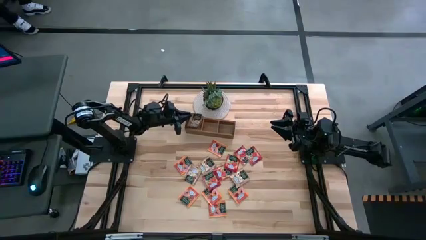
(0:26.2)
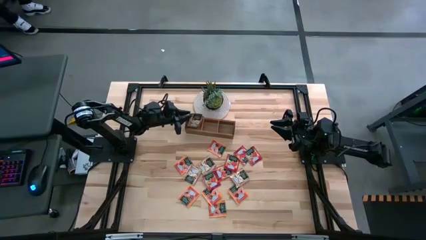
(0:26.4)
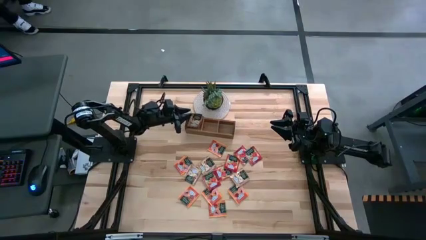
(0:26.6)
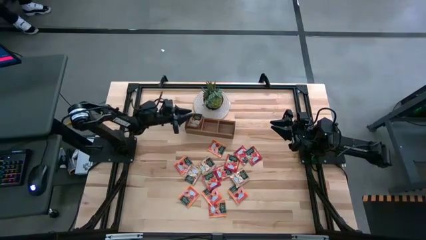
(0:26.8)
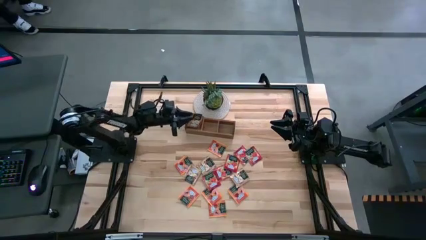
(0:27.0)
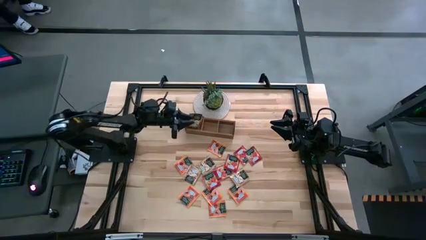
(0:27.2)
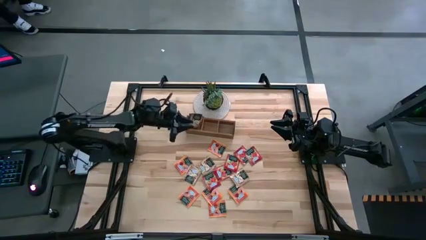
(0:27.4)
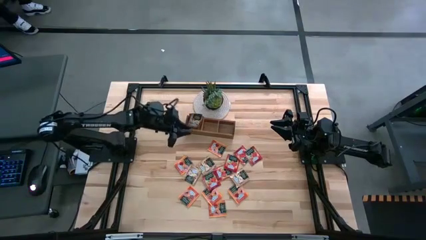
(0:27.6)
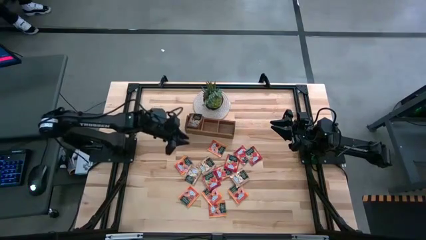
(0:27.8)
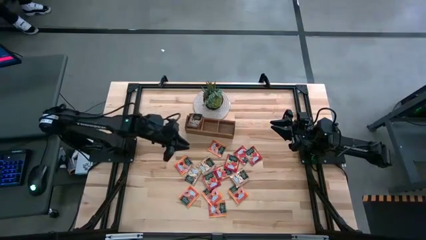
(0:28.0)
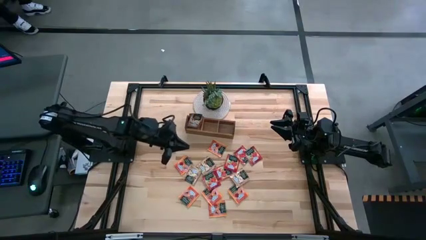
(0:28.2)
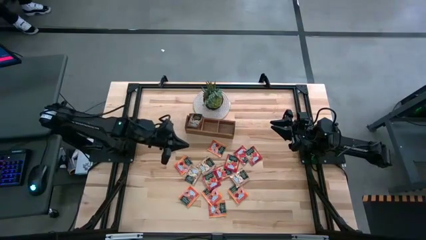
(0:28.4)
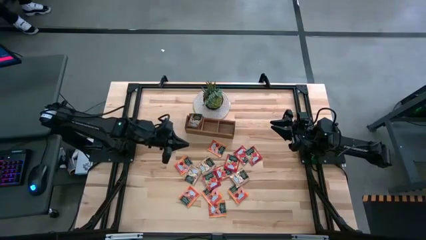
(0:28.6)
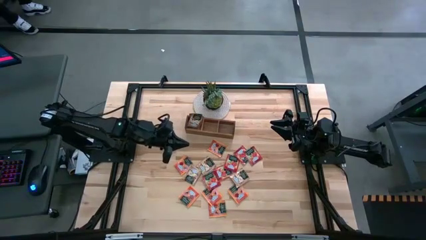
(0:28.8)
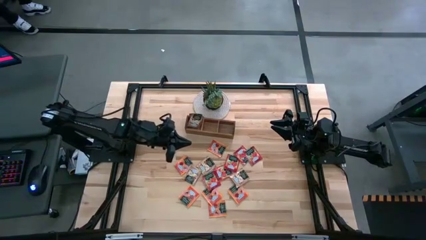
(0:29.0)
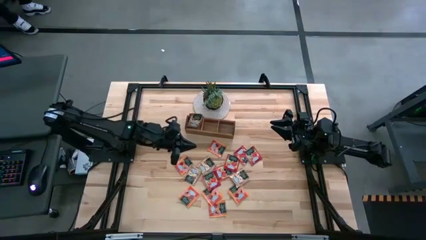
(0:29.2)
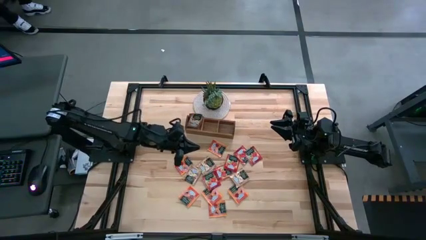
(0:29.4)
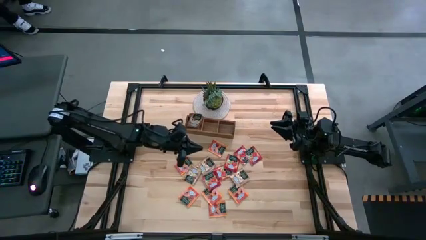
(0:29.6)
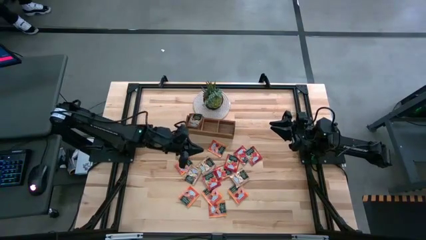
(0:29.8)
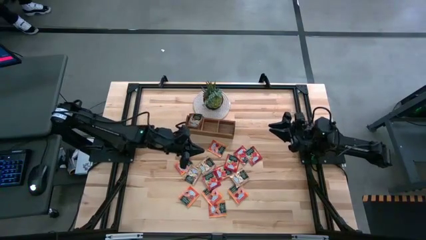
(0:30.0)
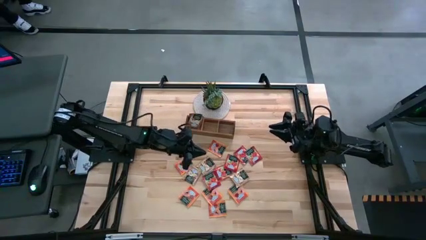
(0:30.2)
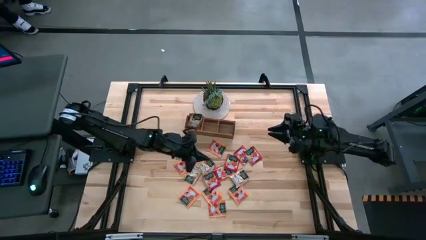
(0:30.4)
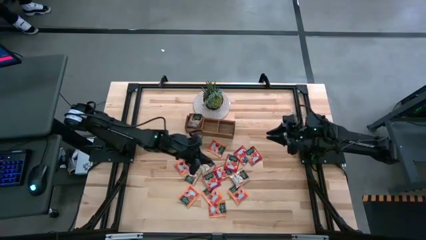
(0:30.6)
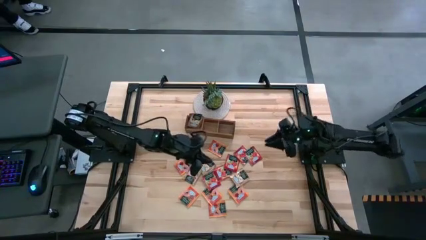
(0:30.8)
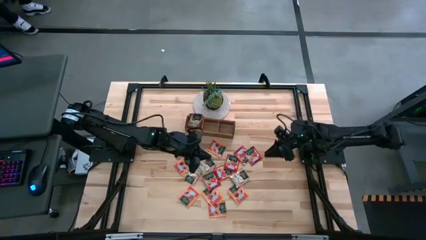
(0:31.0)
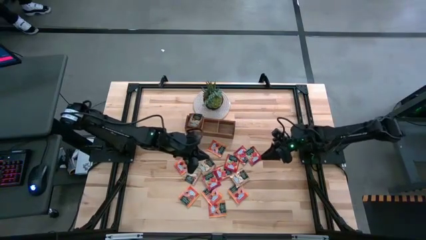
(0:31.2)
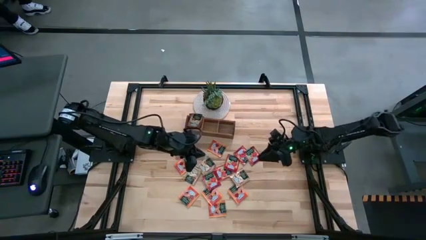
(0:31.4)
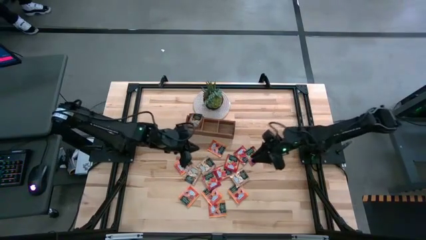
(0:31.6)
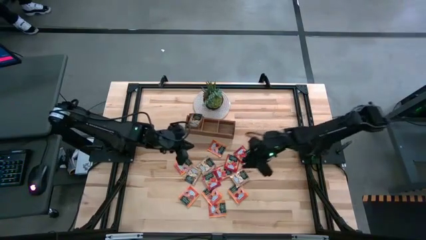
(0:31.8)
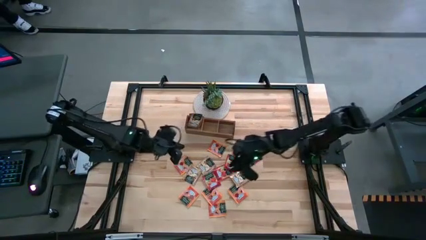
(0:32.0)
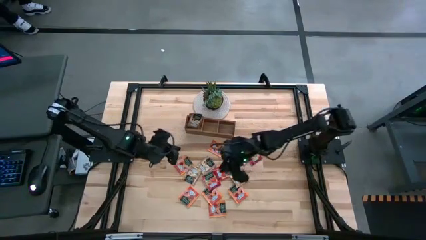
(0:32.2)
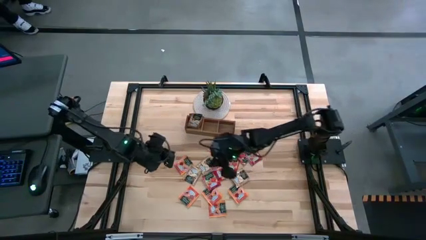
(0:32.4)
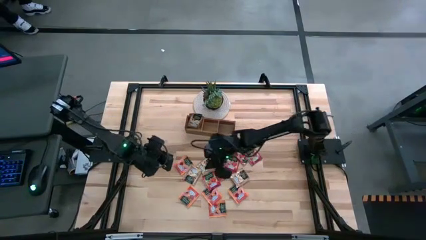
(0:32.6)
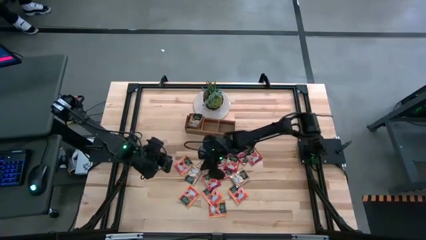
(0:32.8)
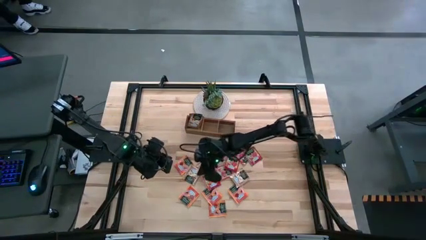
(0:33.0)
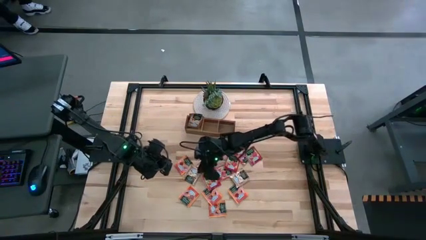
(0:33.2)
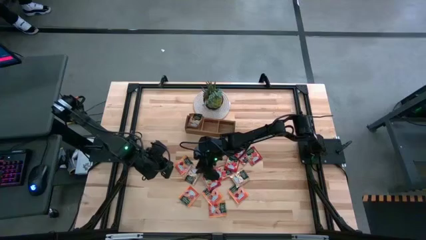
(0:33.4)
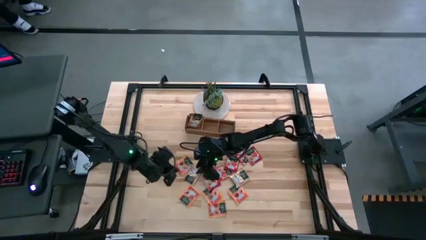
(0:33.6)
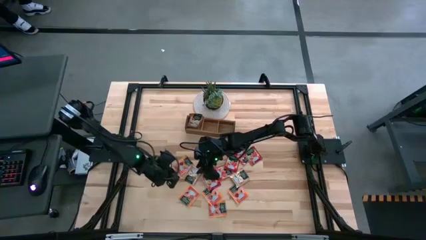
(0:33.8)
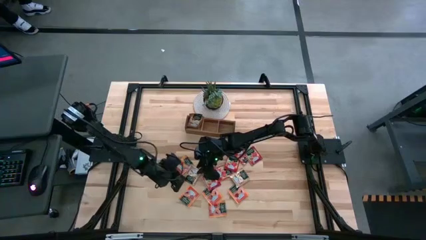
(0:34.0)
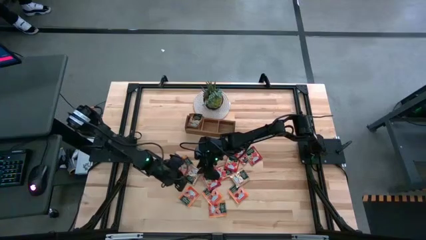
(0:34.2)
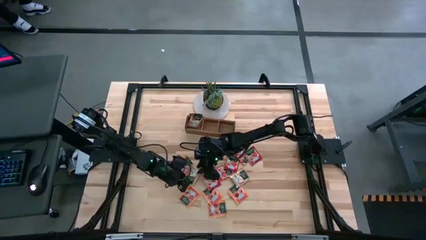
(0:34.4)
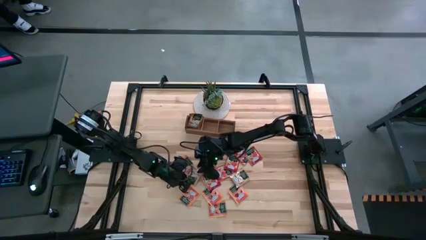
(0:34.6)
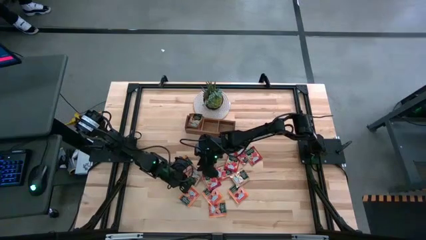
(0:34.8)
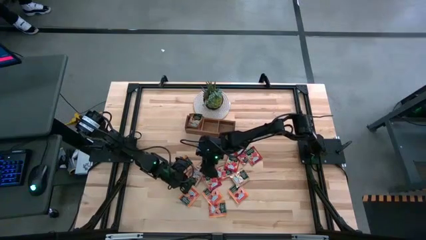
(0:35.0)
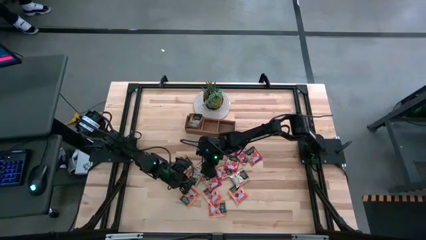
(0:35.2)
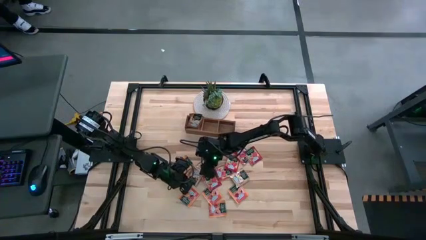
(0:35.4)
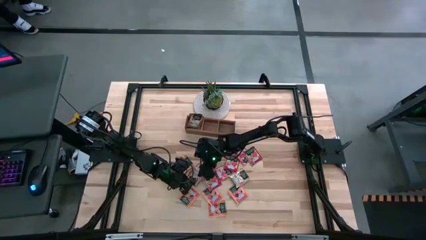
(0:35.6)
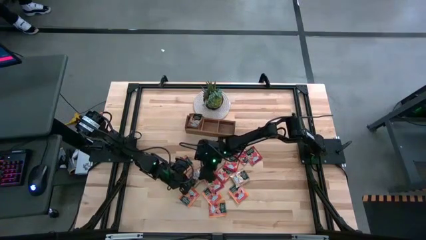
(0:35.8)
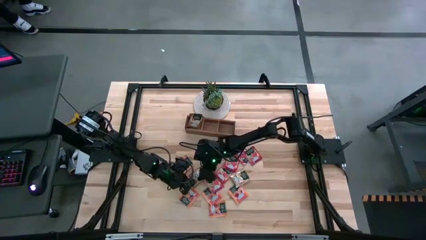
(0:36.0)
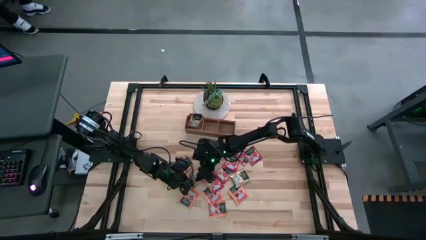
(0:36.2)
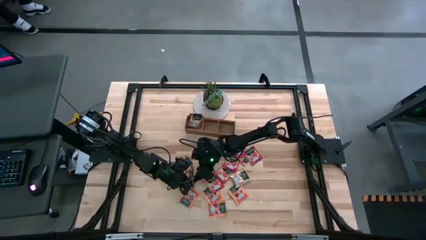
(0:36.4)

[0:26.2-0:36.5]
Task: Pick & Place Tea
Put the left brown tea bag into the left section of the wooden organizer

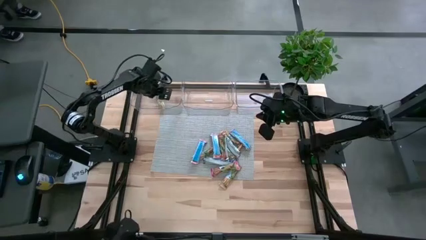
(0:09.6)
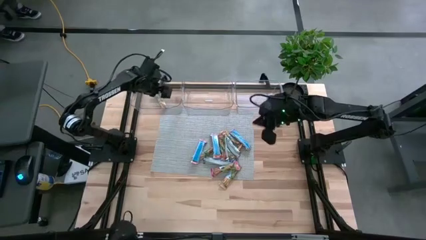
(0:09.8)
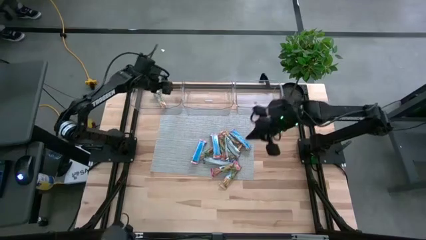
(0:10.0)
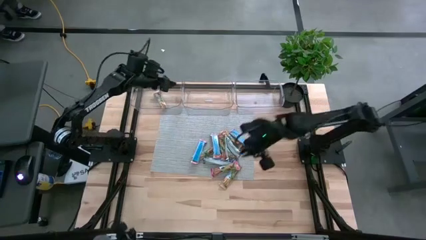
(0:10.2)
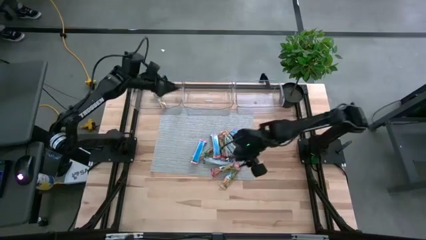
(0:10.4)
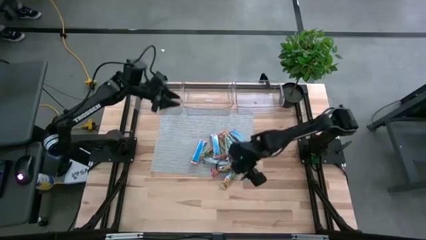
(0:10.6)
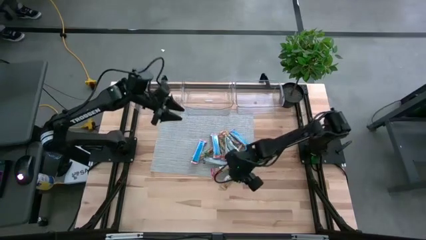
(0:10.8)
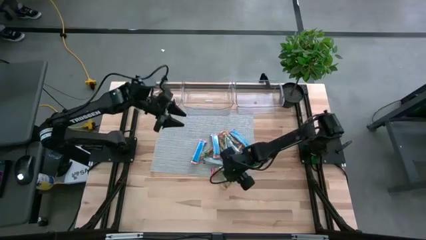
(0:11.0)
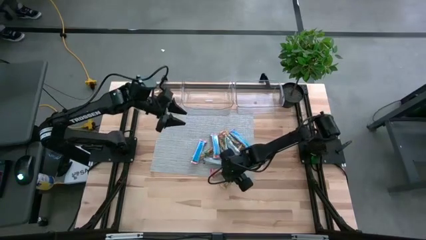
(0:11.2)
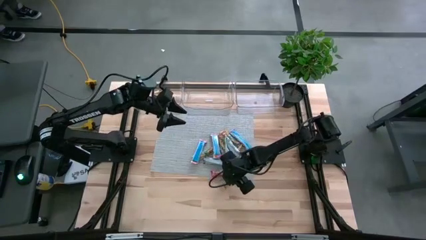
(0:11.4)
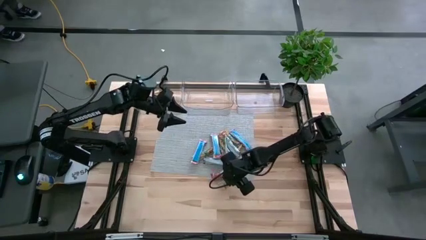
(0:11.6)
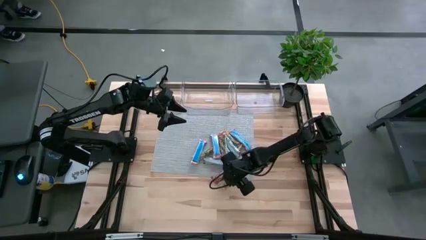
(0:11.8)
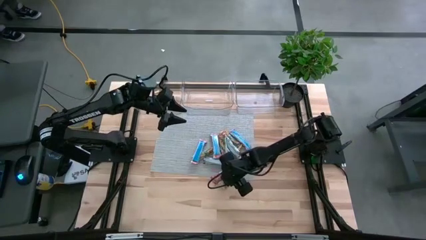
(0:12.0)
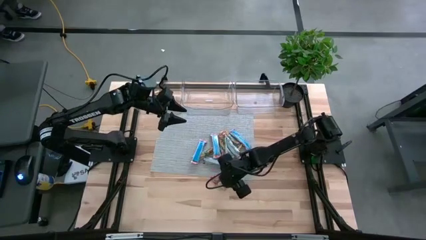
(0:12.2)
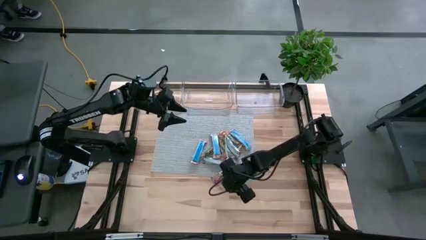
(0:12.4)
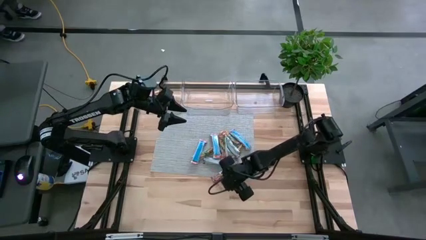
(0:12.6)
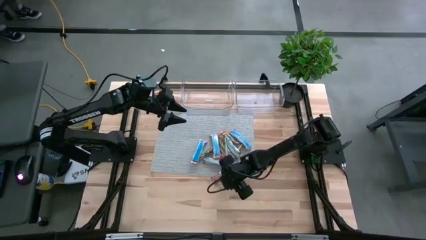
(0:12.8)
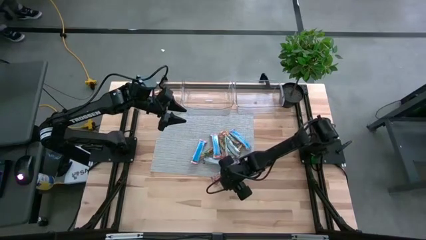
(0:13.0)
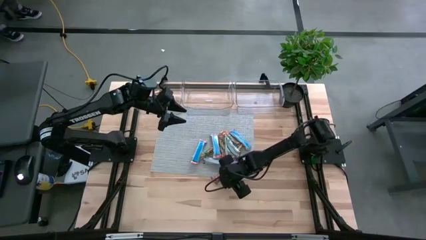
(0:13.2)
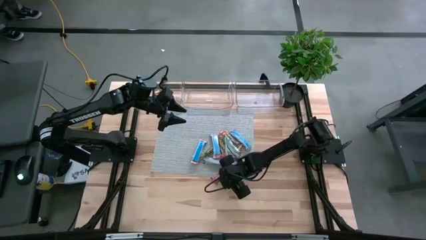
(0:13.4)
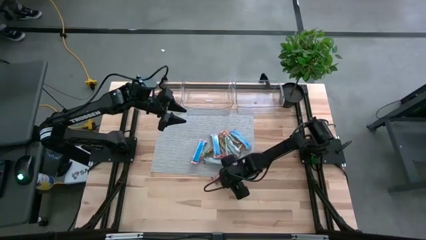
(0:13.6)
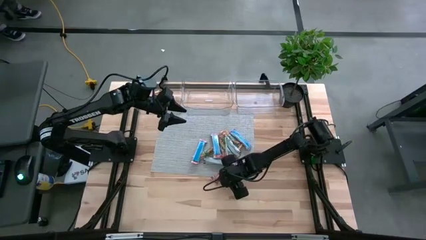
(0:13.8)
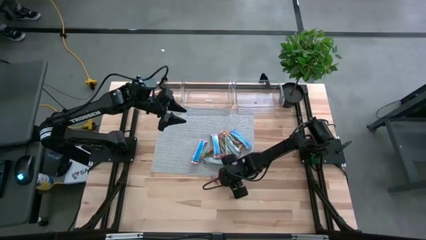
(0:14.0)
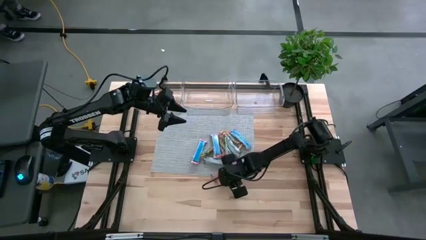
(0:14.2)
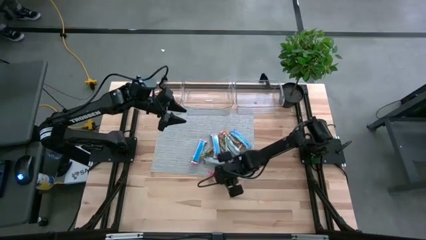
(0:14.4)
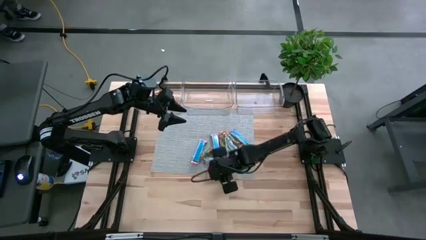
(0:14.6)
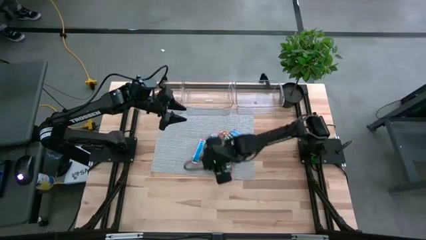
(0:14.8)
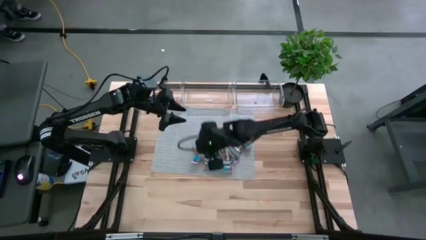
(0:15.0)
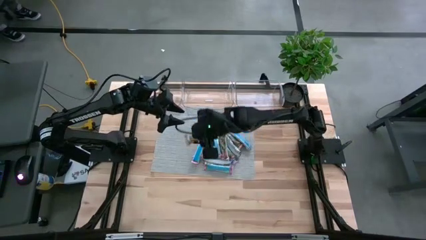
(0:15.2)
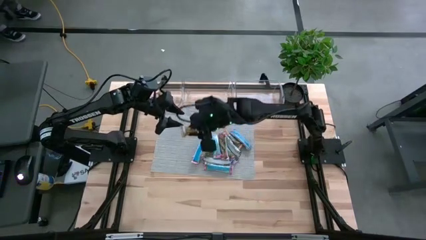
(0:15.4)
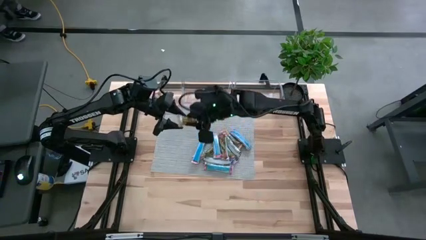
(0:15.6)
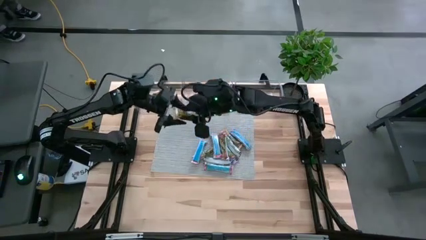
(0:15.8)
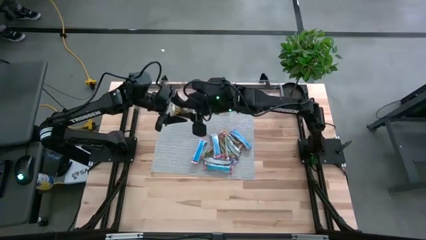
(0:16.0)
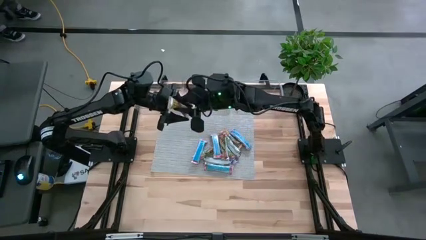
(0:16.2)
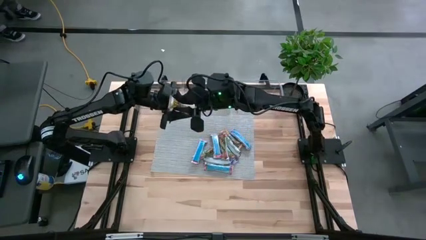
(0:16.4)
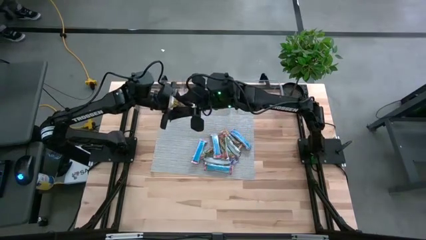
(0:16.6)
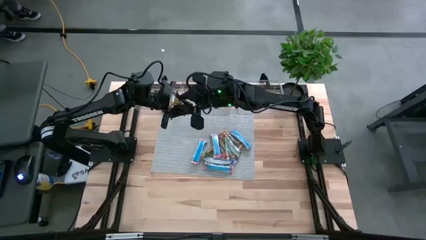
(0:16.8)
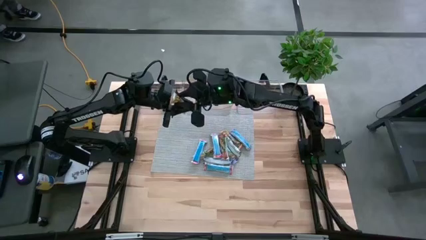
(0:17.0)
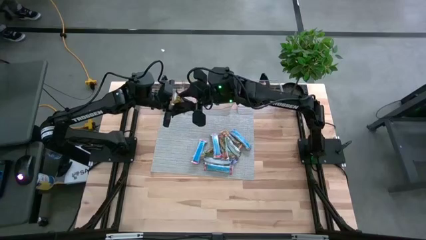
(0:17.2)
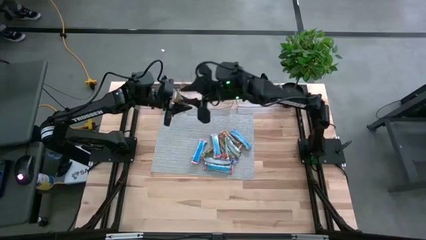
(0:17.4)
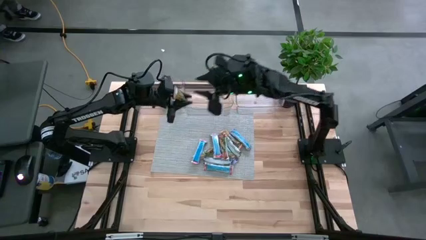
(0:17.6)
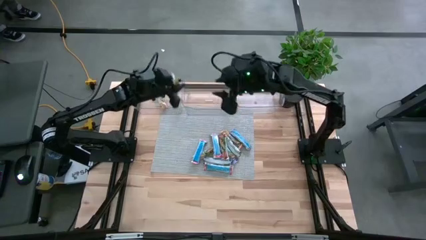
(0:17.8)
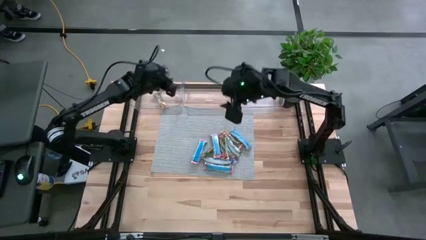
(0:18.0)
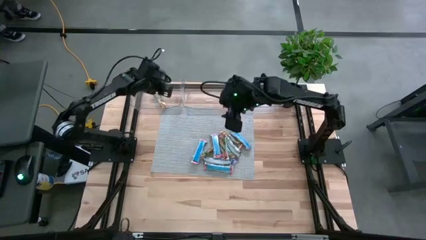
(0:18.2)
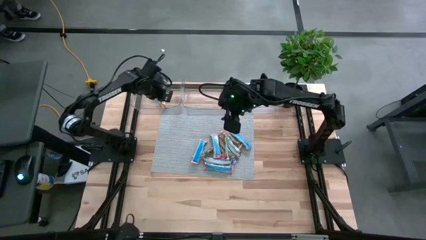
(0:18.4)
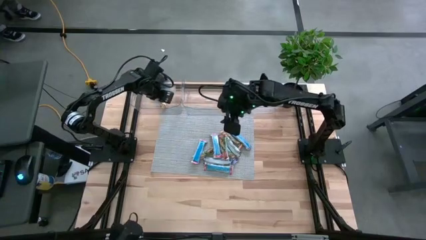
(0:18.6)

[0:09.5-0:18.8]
Task: Pick and place Granola Bars by type
Put the yellow granola bar into the left transparent bin
